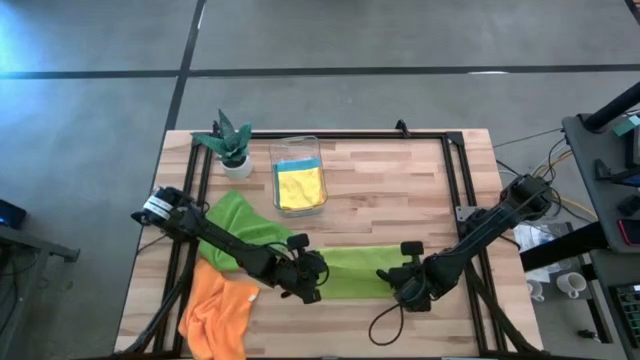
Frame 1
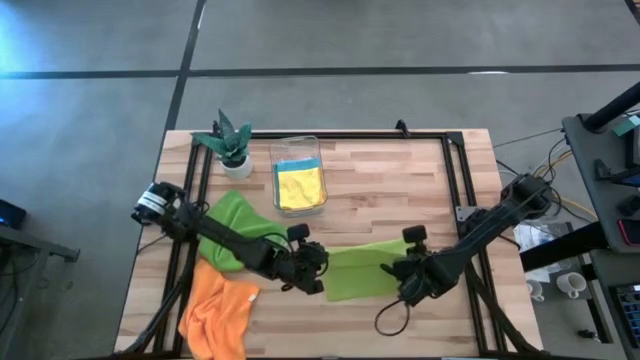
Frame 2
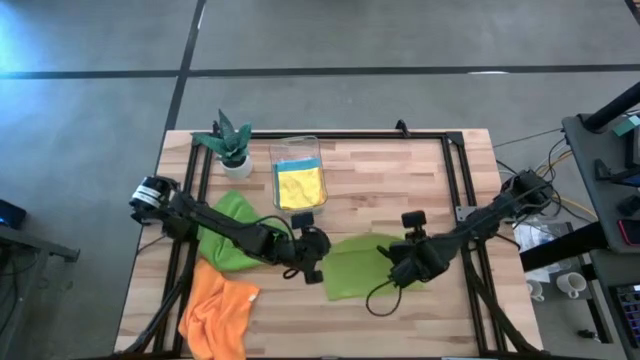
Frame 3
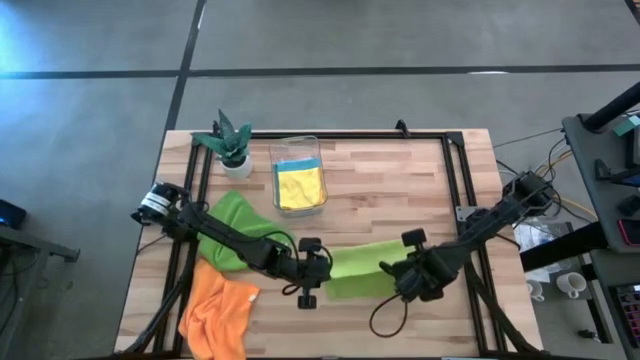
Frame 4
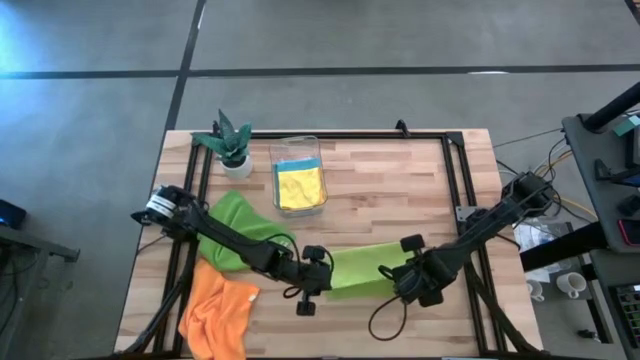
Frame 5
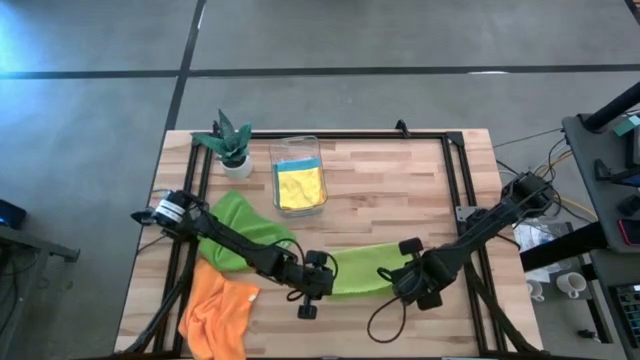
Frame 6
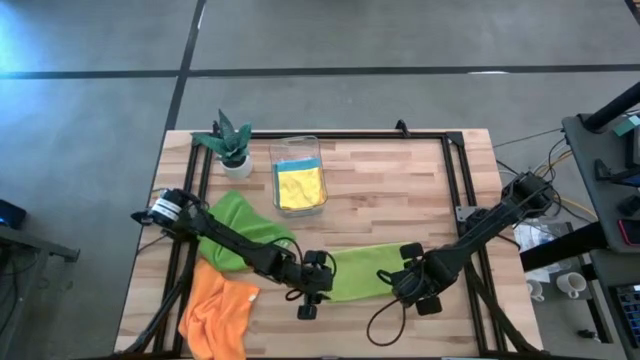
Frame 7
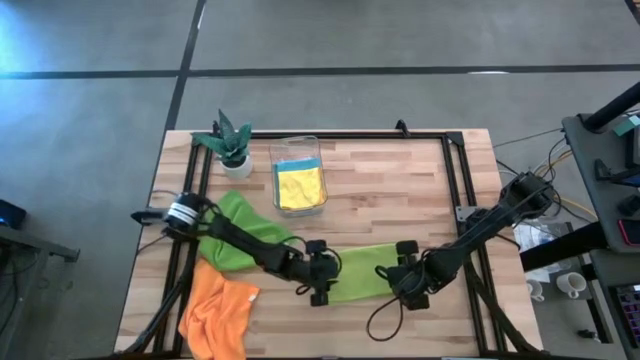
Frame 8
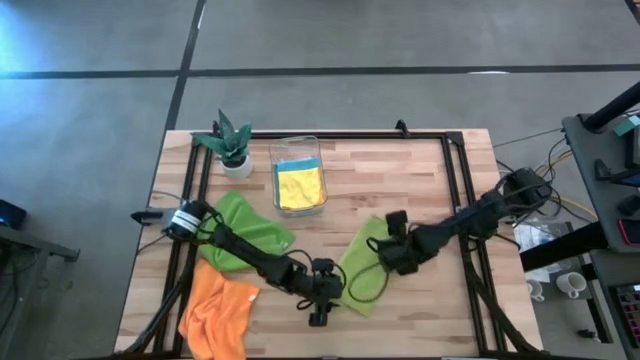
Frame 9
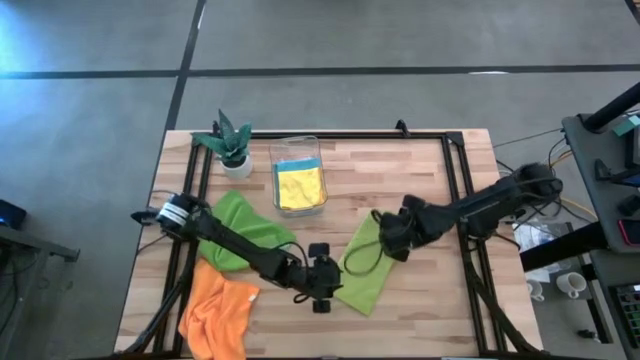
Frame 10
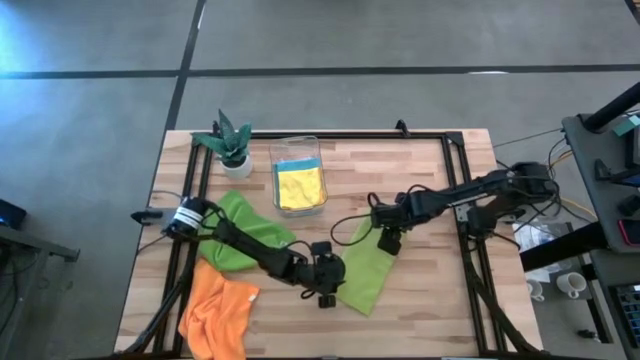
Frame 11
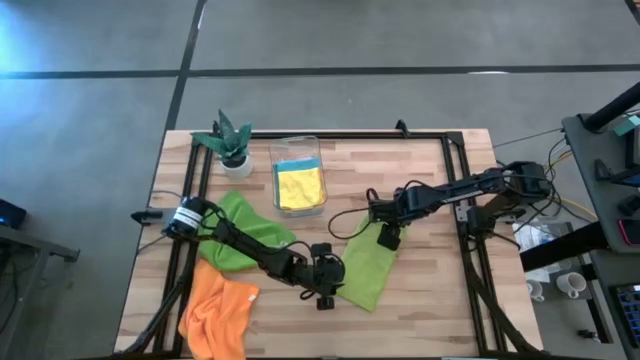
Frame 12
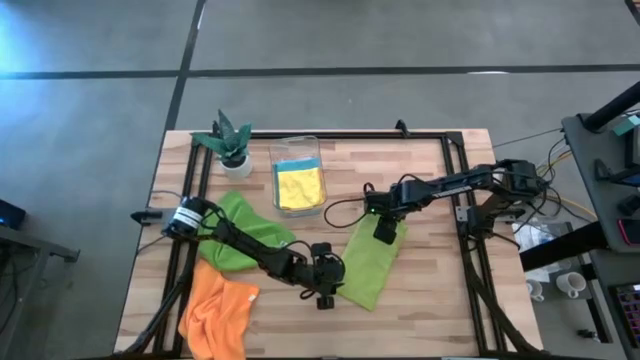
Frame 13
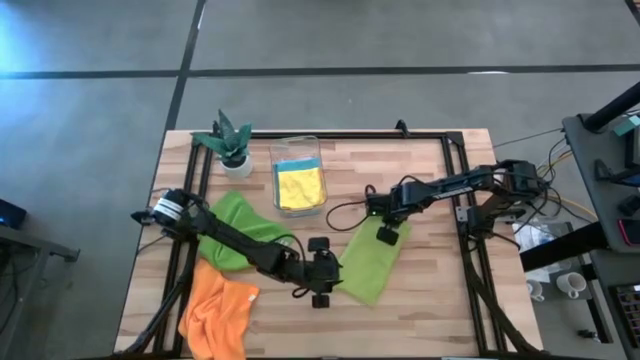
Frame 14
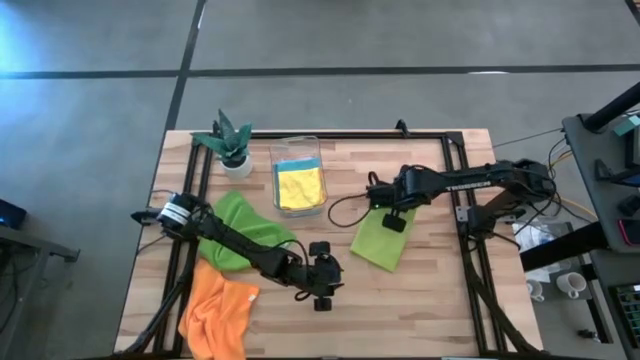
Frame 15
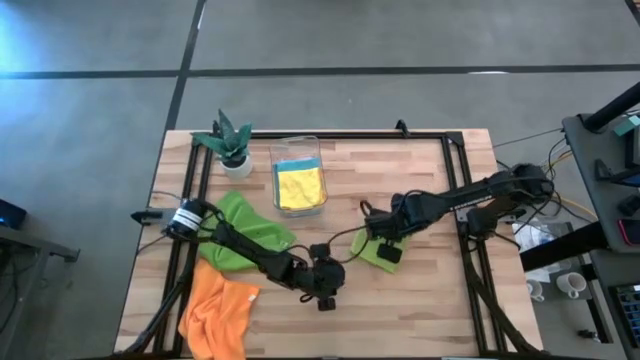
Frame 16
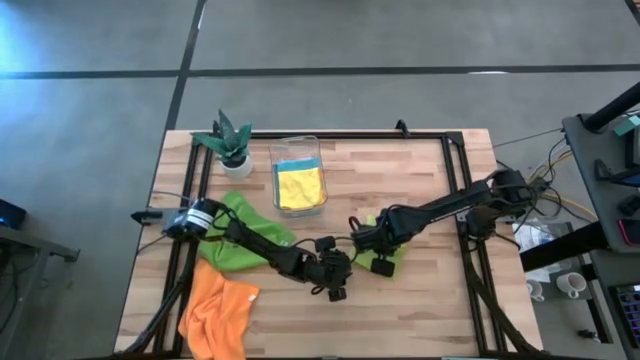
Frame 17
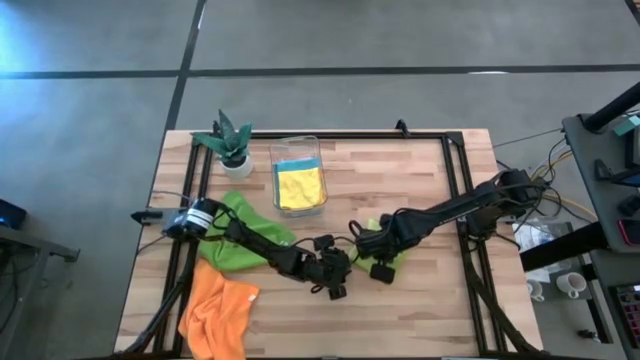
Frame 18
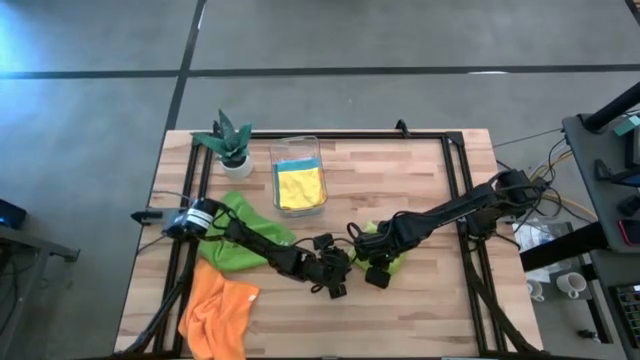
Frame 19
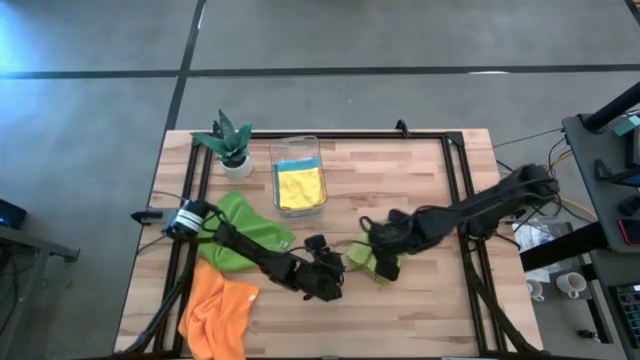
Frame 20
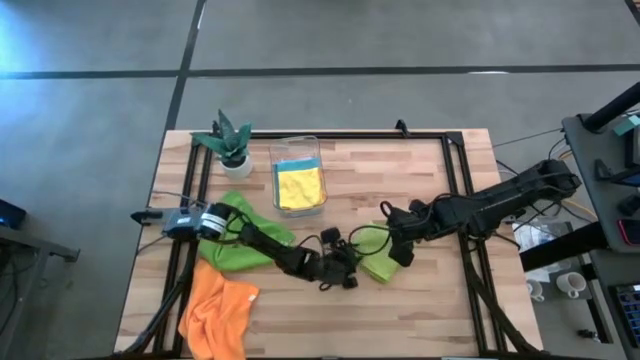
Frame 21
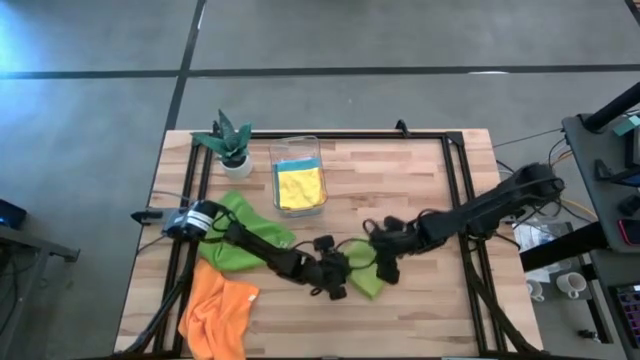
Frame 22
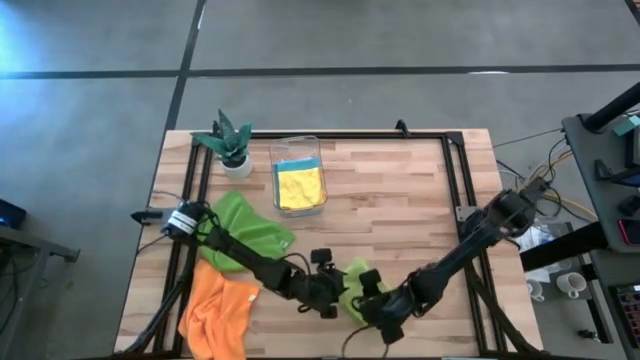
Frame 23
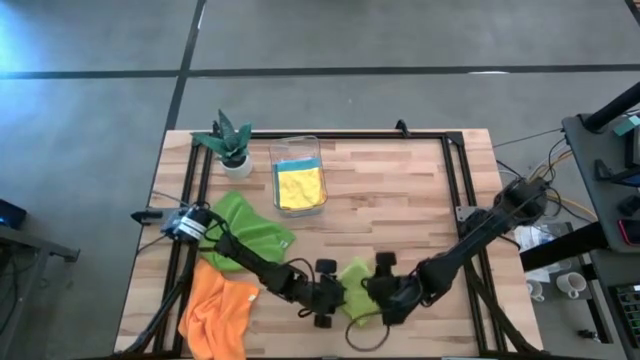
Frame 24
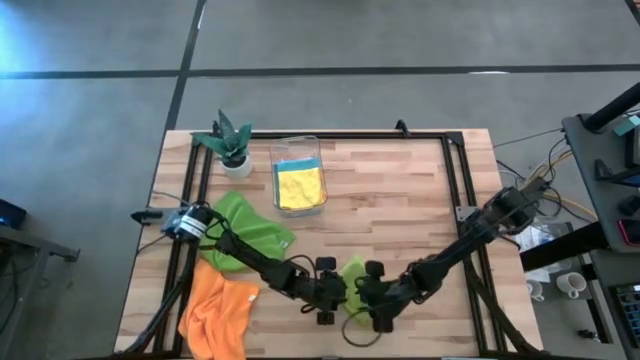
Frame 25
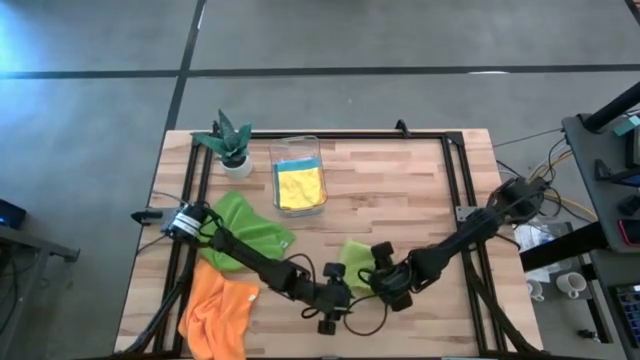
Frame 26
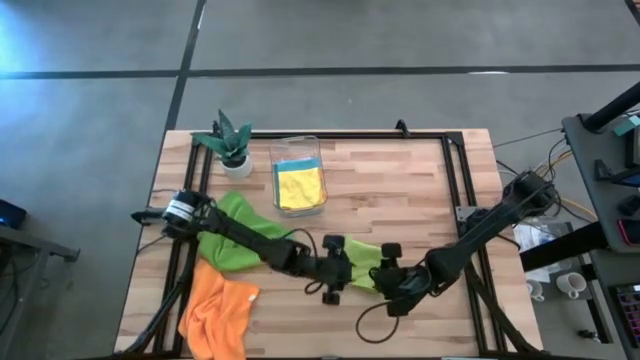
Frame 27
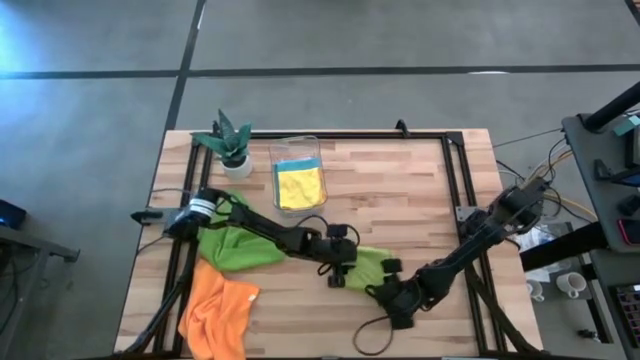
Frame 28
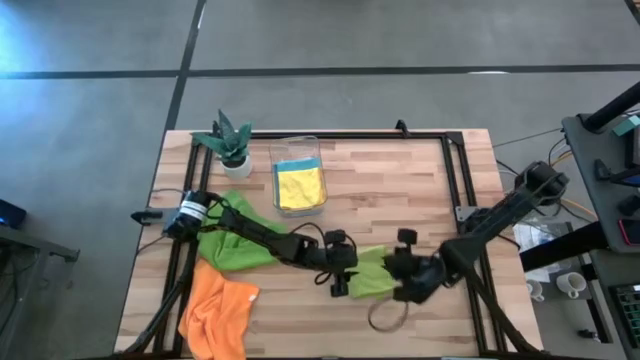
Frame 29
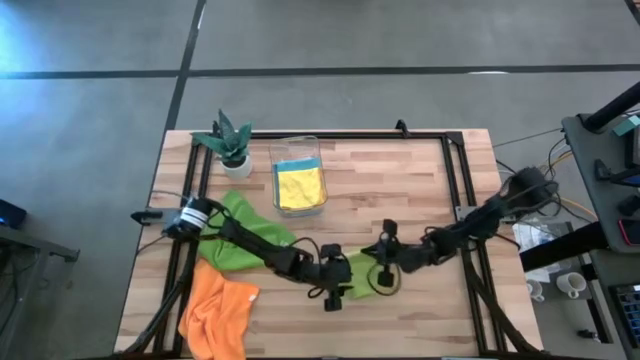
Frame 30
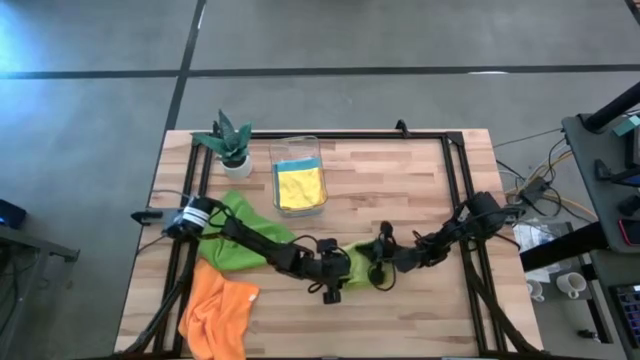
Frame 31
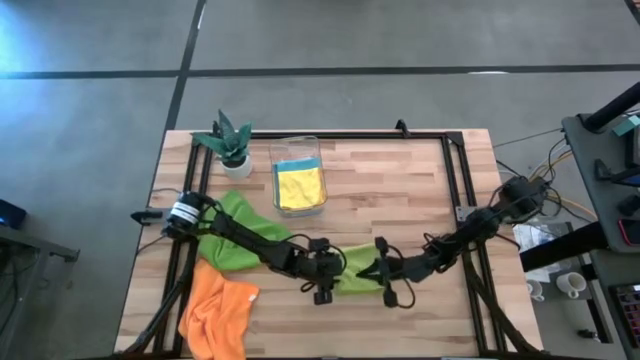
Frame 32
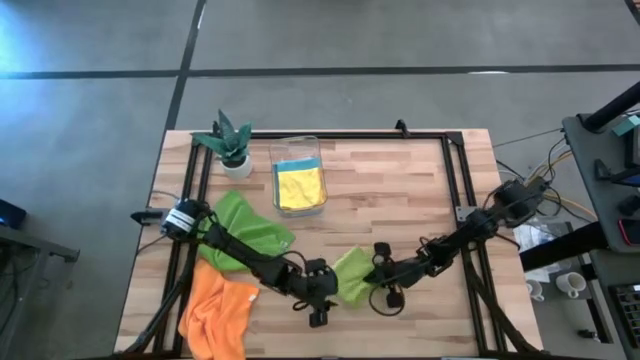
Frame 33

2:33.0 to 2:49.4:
Task: Fold microfiber towels
Fold the light green microfiber cloth

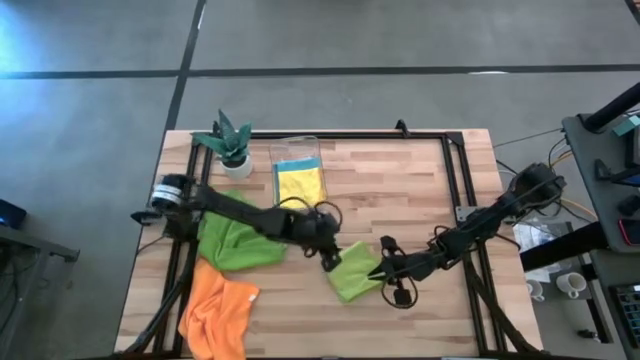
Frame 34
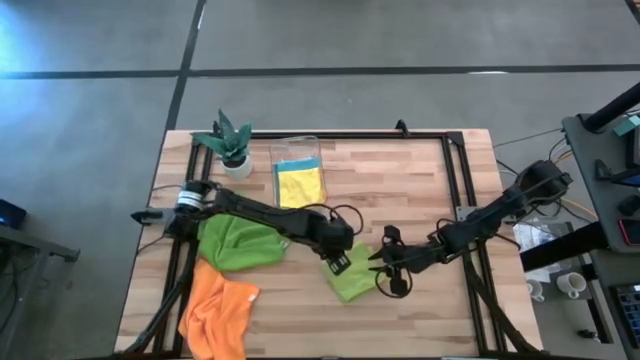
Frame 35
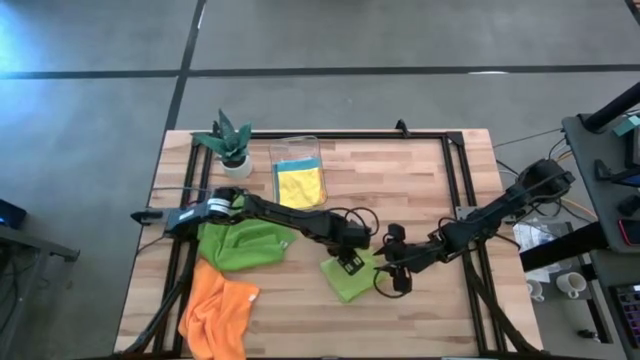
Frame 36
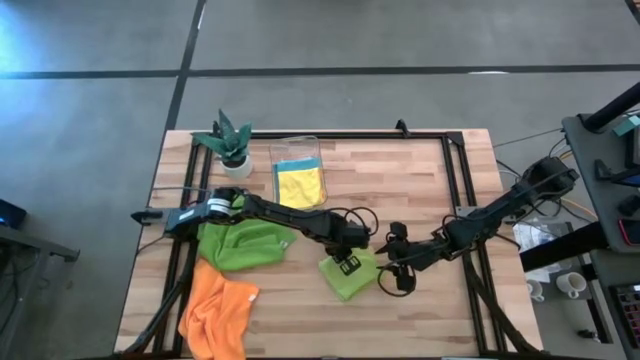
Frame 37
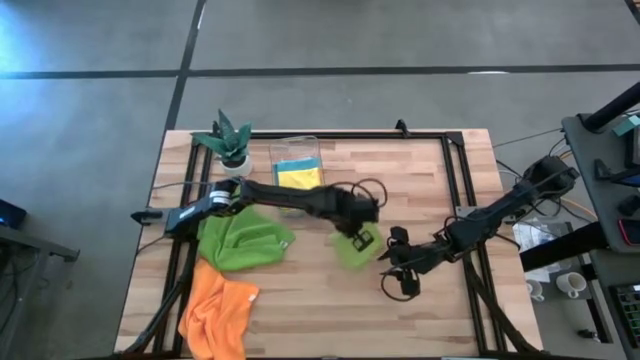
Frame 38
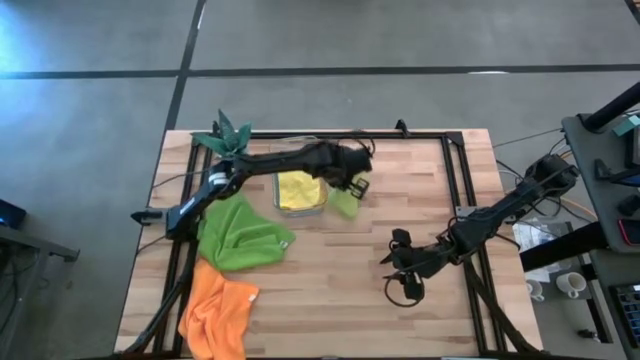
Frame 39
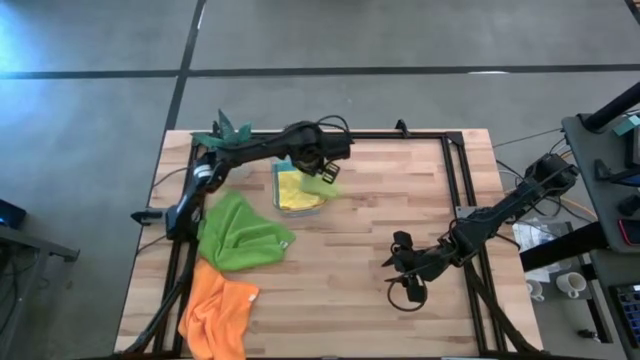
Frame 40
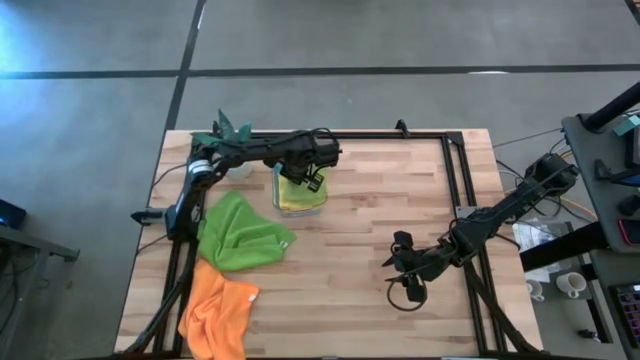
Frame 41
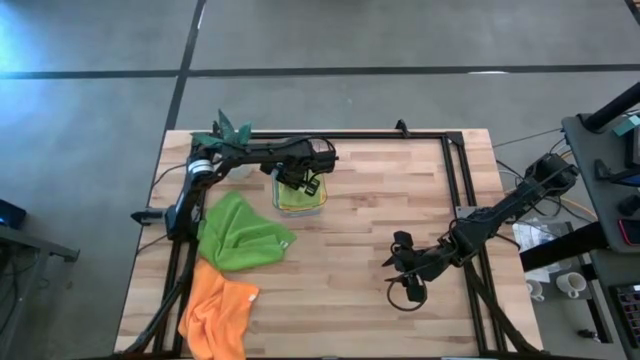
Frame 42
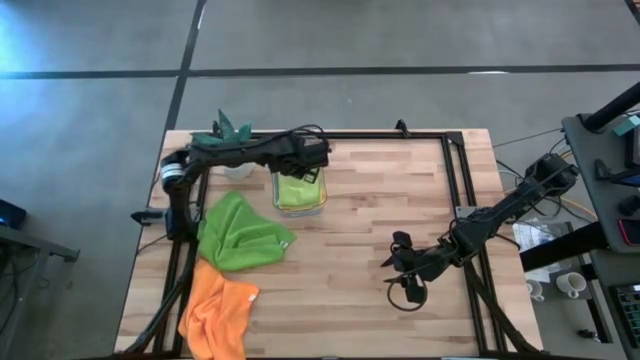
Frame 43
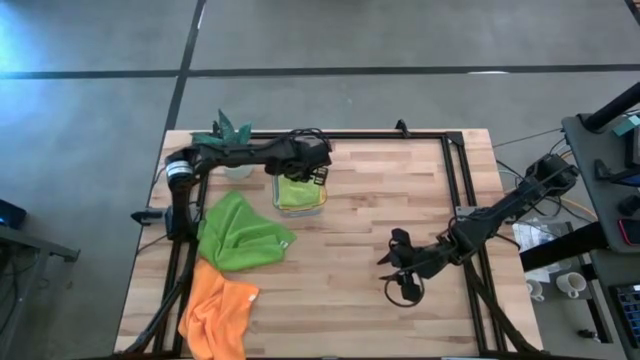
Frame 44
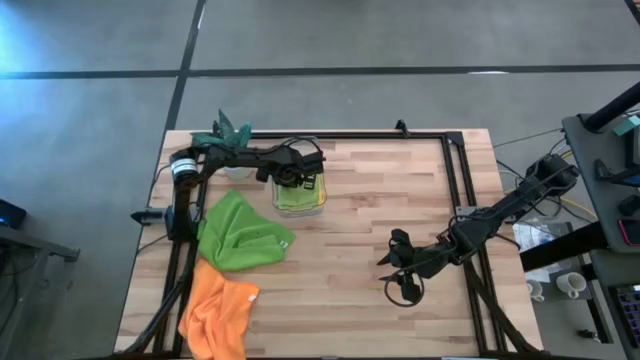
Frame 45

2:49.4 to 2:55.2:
Stack the light green microfiber cloth on top on the yellow microfiber cloth into the bin
